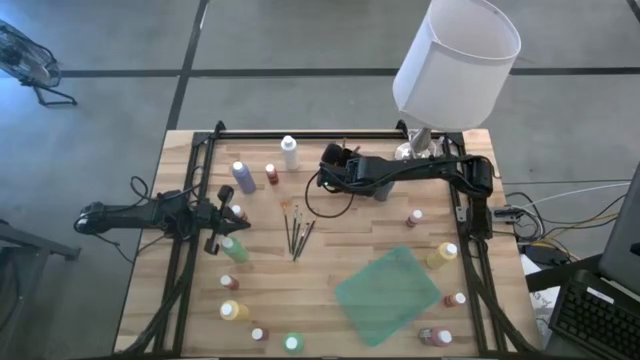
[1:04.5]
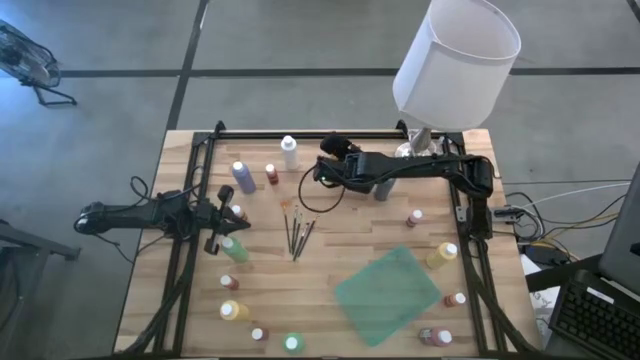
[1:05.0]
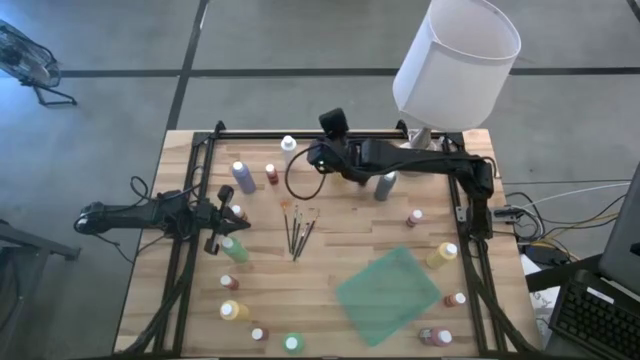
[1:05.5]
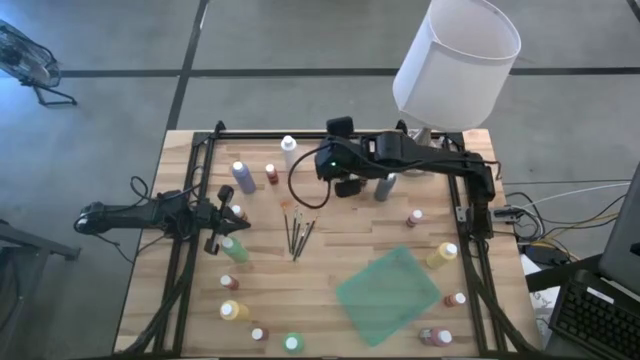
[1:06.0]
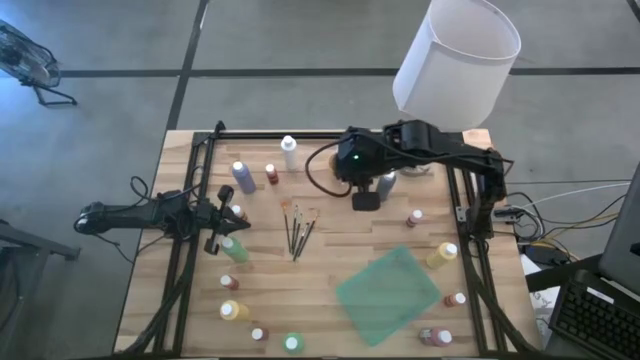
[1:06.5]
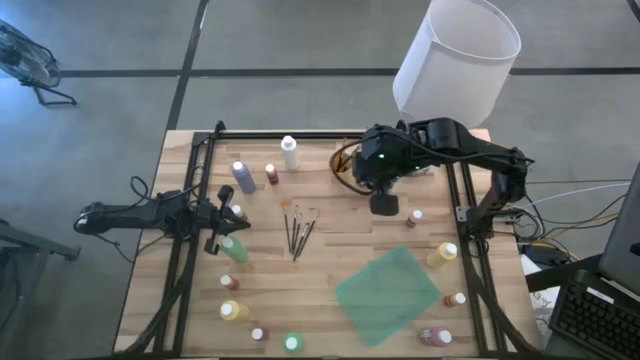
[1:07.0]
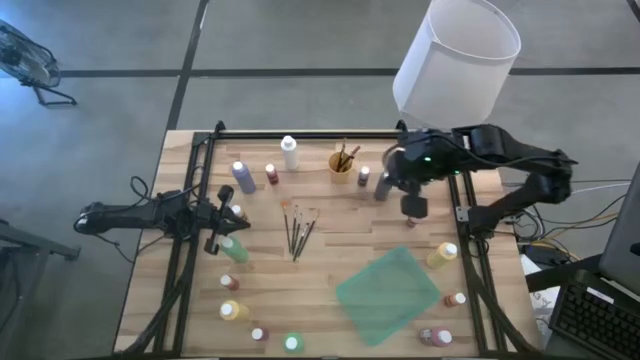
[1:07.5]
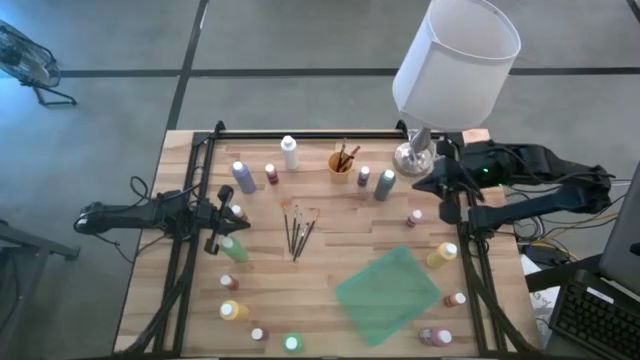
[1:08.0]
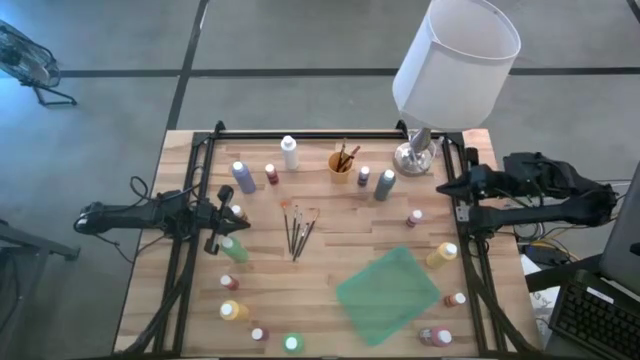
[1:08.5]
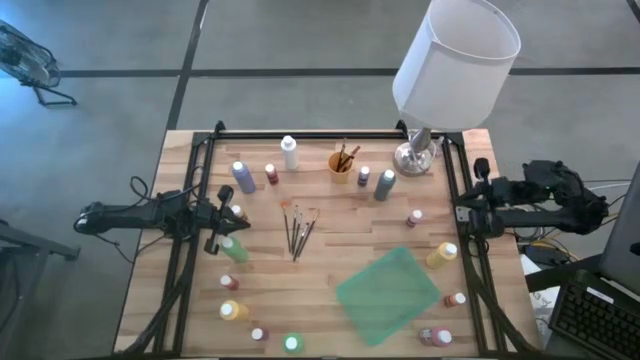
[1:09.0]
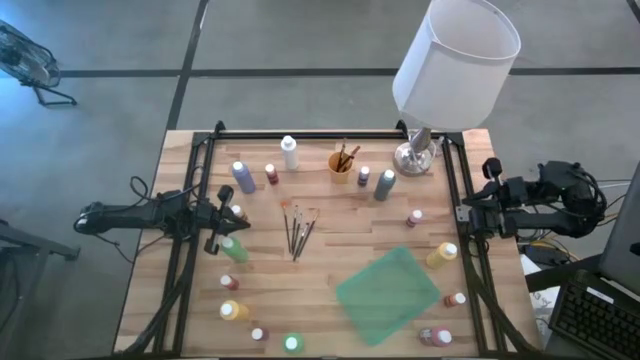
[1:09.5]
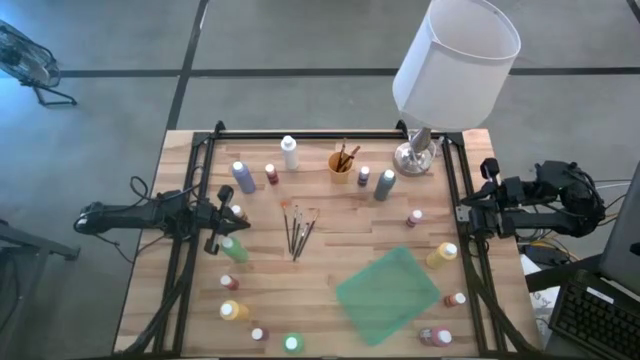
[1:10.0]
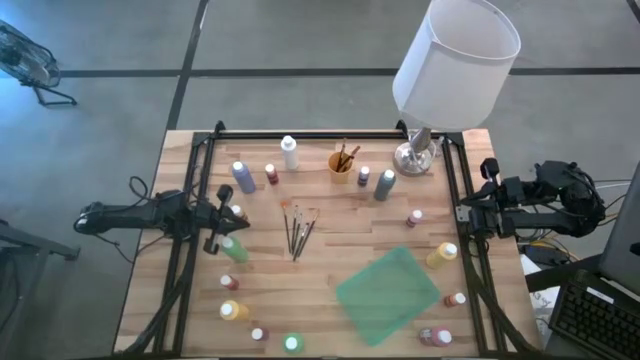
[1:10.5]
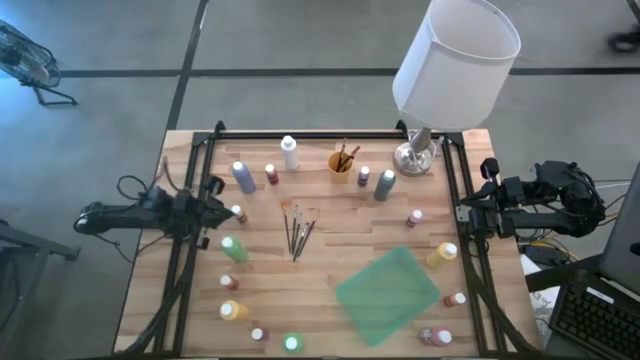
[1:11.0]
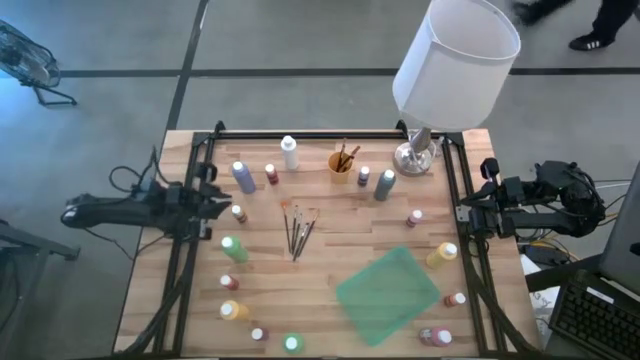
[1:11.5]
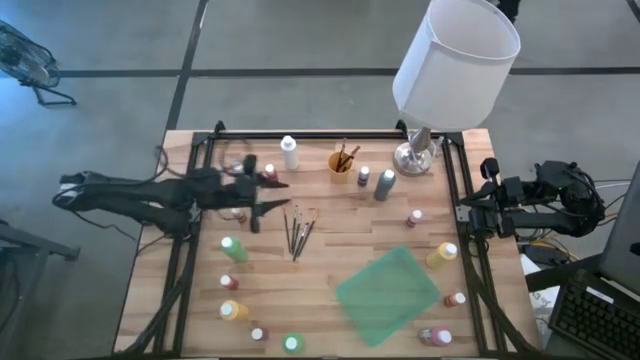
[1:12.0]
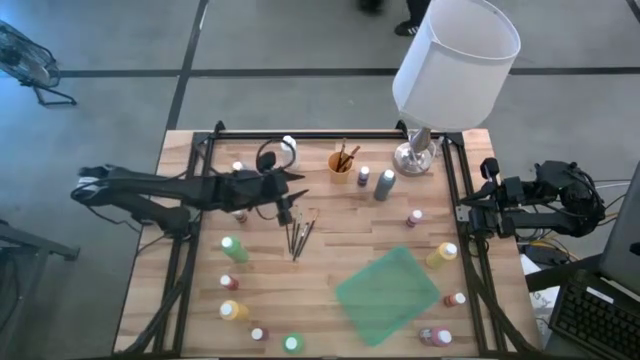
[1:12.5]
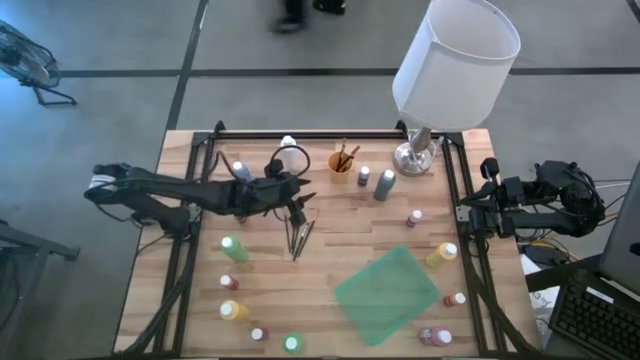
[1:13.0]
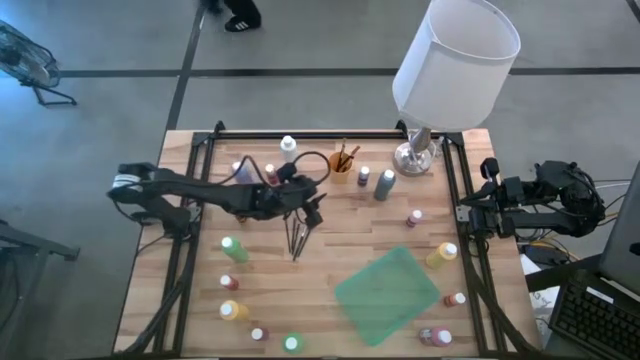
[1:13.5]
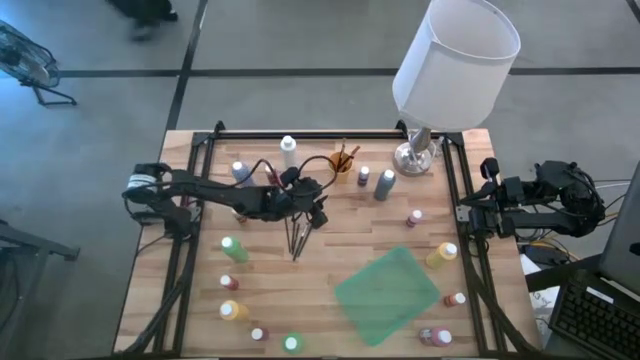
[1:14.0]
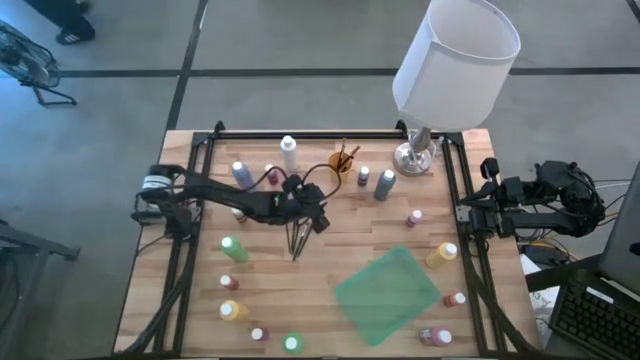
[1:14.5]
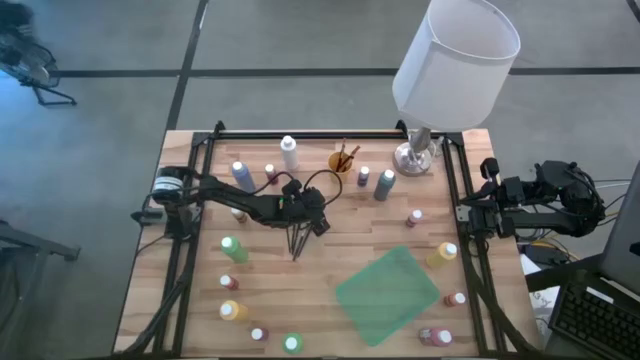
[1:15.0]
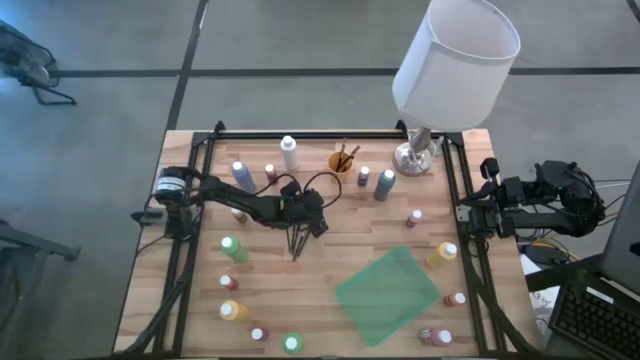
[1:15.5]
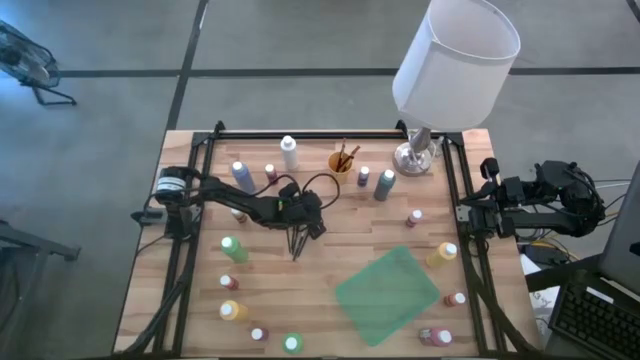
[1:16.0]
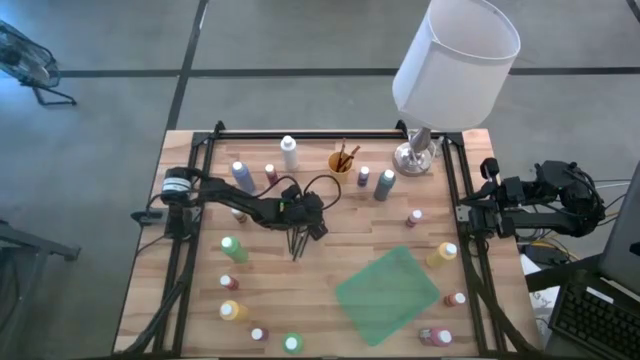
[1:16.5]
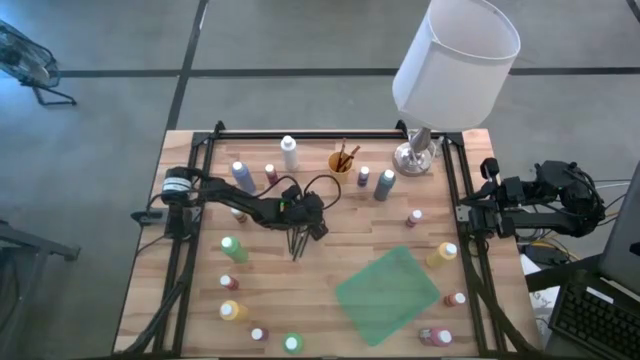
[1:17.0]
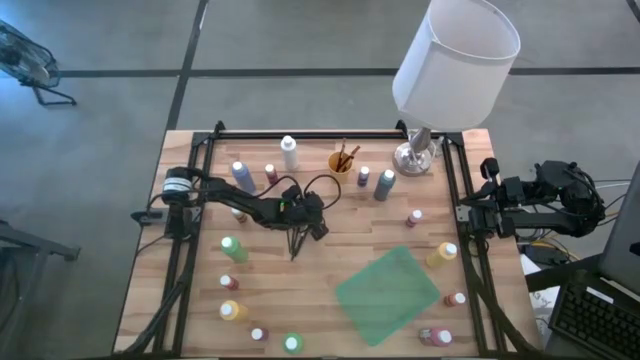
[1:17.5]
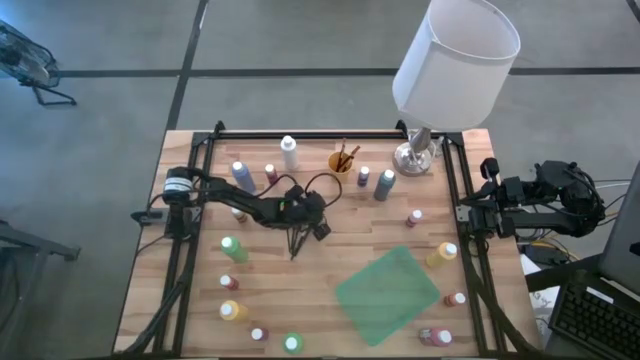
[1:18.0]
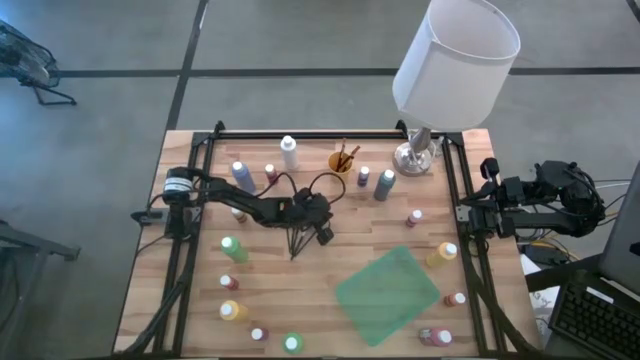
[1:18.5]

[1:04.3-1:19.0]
Task: Pick & Place Paint Supplies
Put the gold paintbrush into the yellow cup

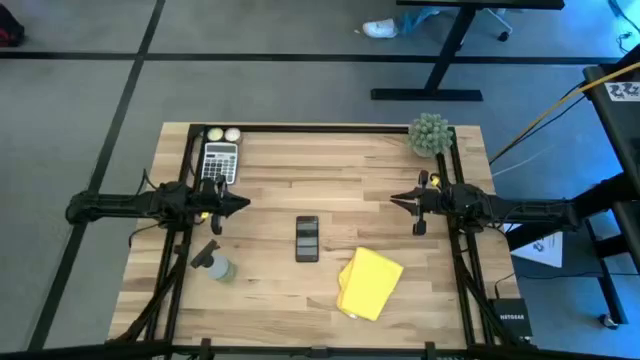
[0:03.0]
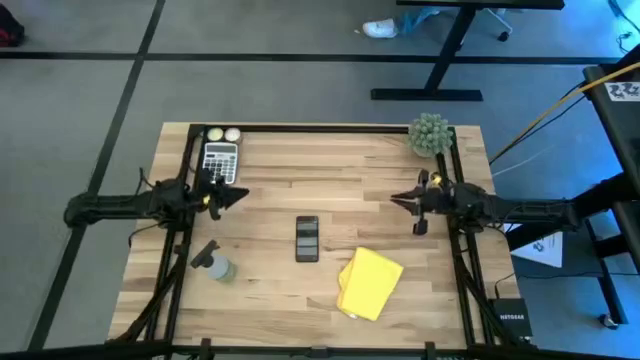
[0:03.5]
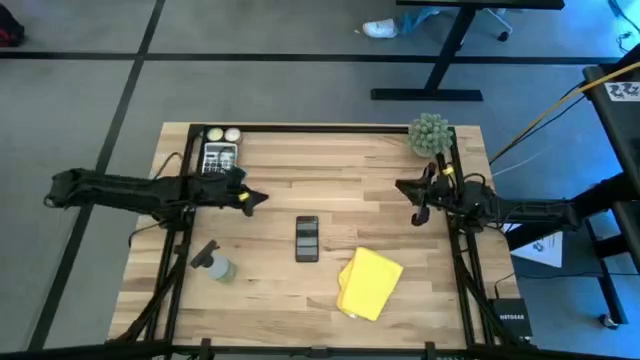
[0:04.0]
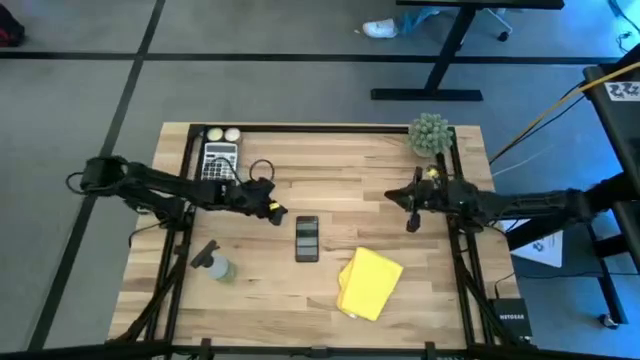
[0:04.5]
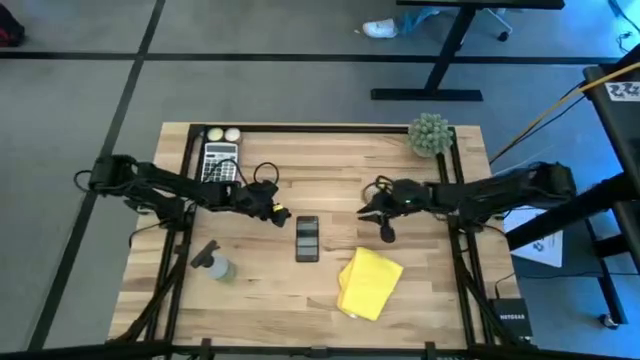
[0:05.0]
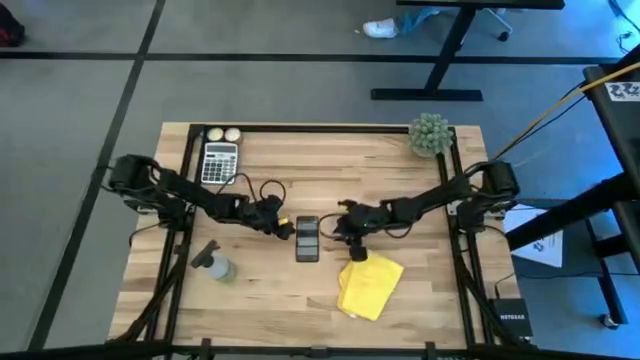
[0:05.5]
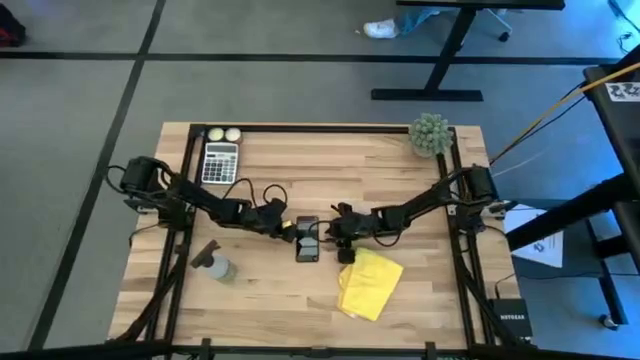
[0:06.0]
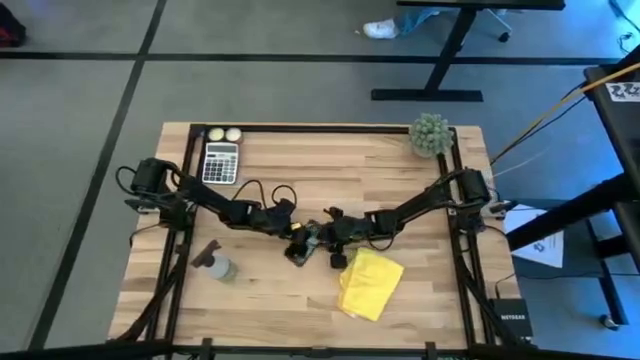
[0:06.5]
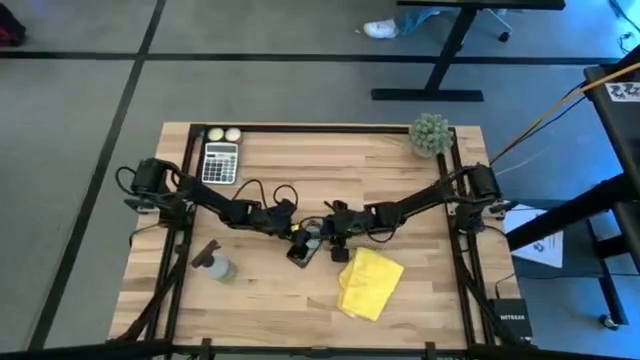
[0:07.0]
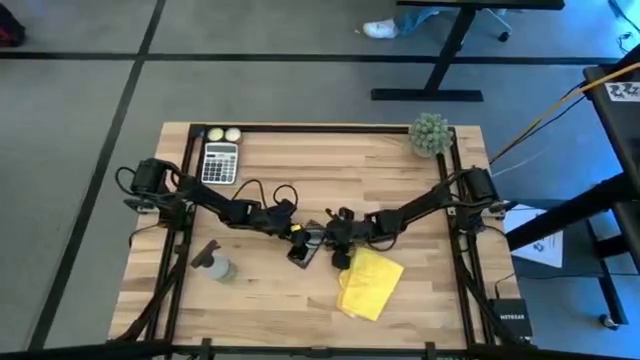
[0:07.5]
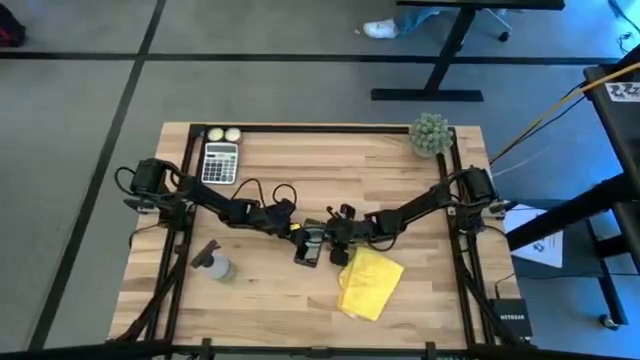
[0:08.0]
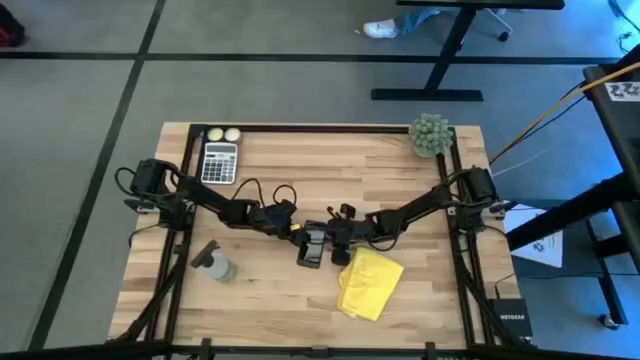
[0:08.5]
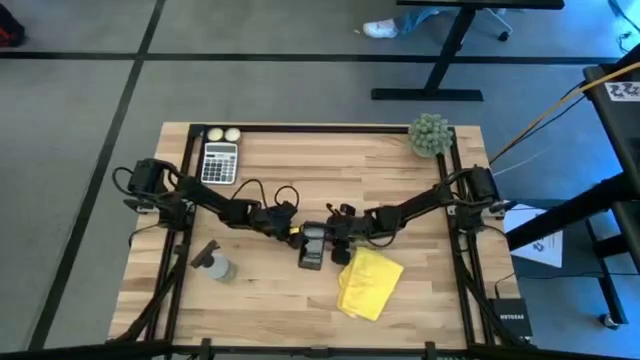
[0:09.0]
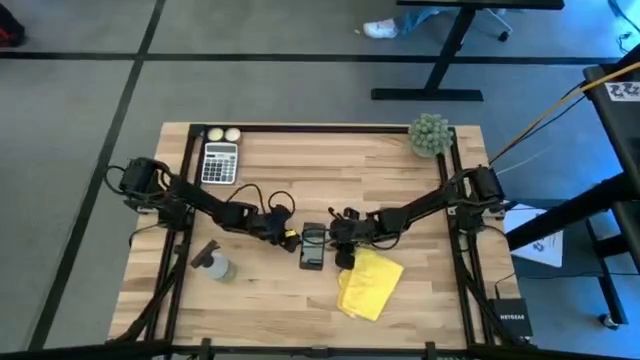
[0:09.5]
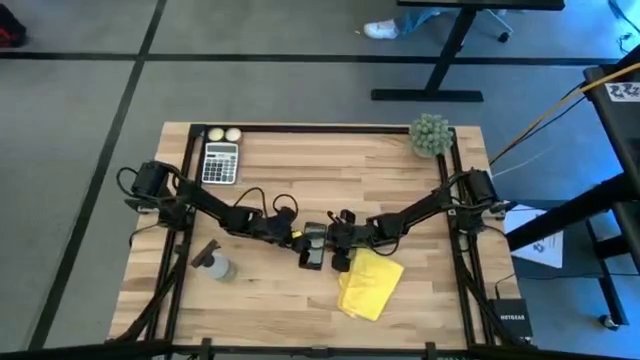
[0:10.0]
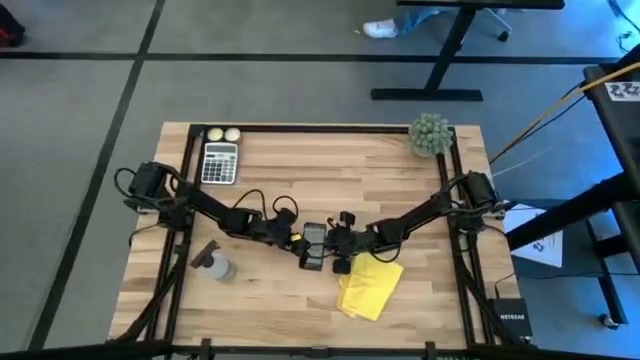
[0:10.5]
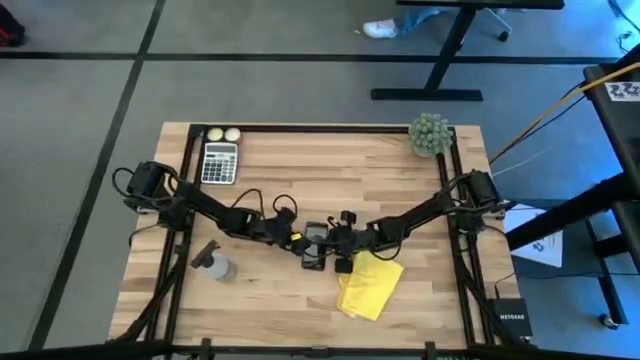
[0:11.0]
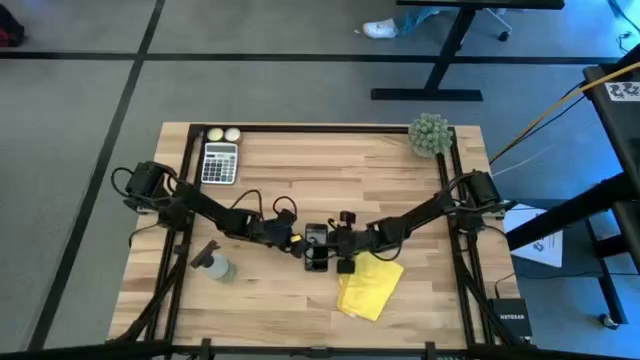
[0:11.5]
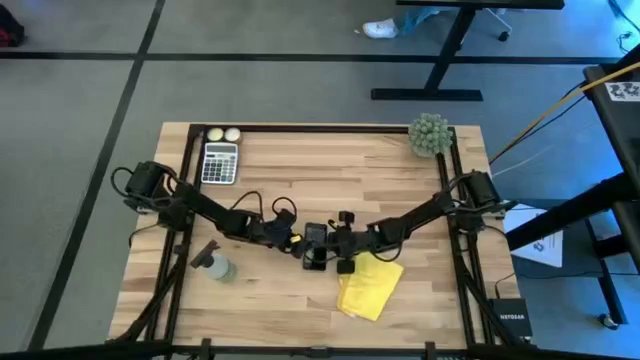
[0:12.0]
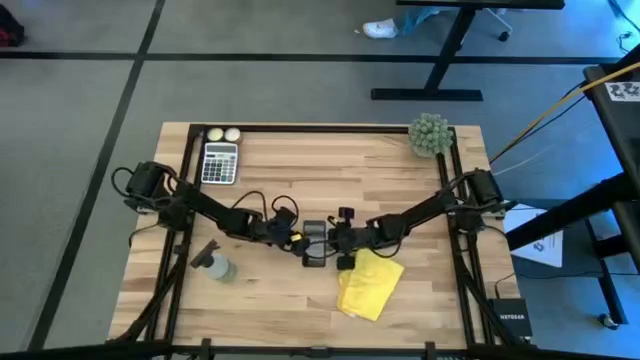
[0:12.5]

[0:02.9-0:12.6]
Task: Apply microfiber cloth
Spray the front of the black cellphone with green spray bottle
